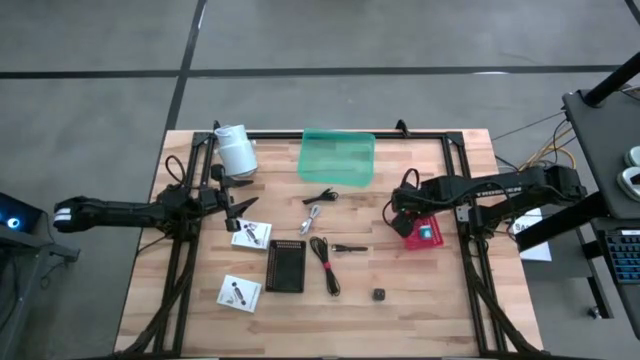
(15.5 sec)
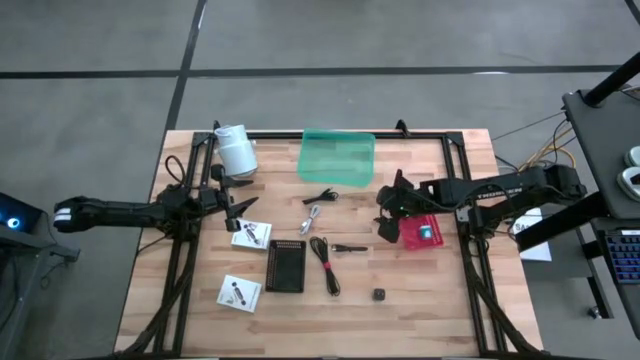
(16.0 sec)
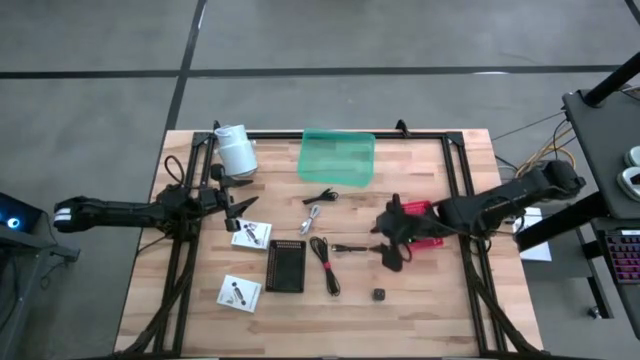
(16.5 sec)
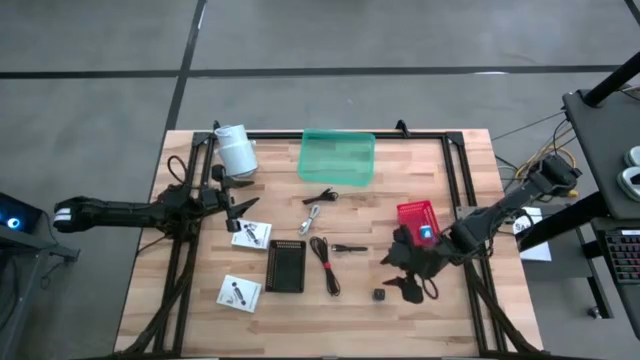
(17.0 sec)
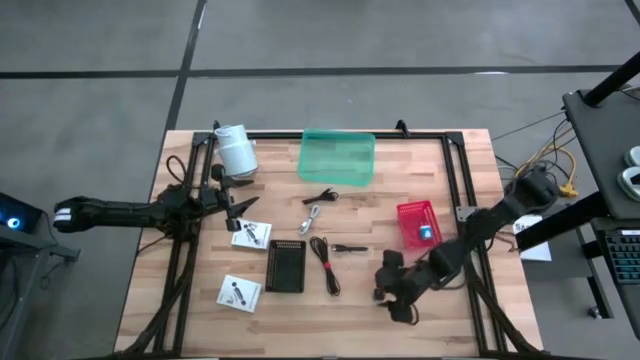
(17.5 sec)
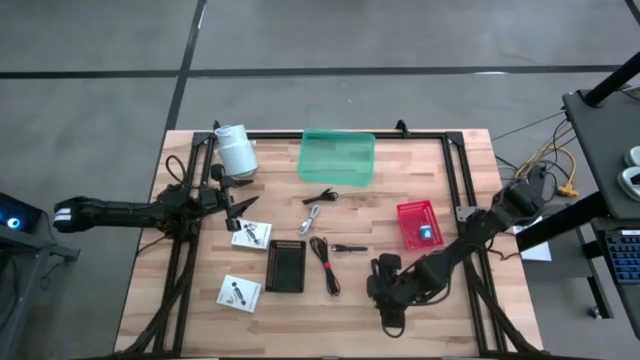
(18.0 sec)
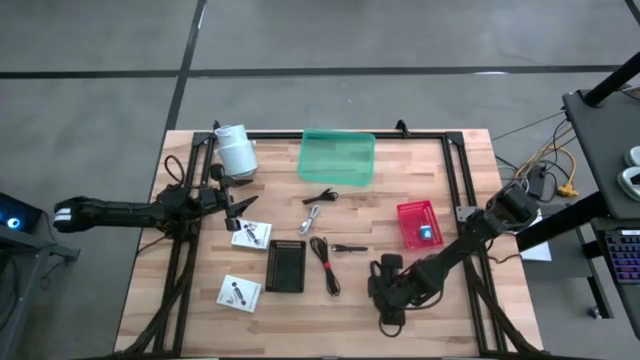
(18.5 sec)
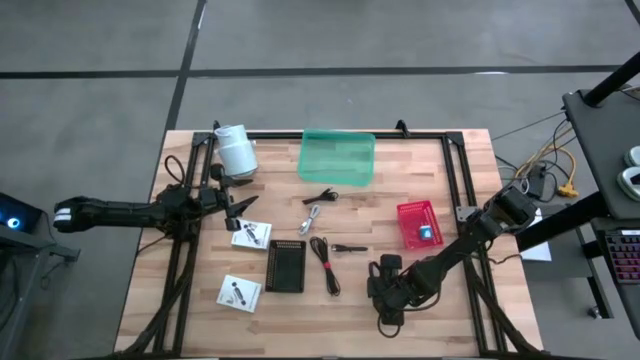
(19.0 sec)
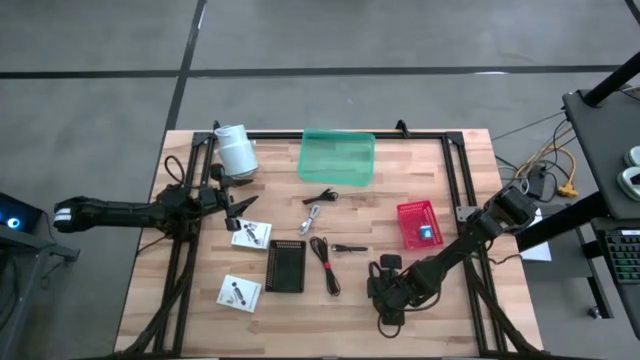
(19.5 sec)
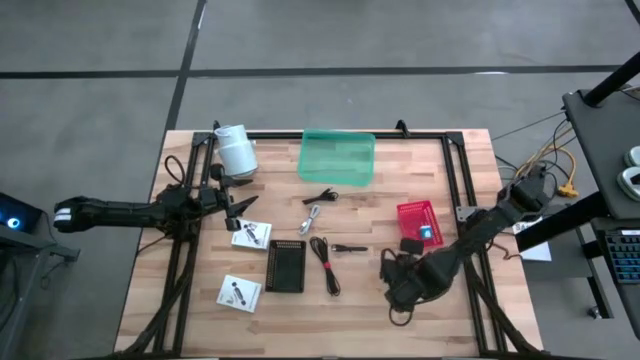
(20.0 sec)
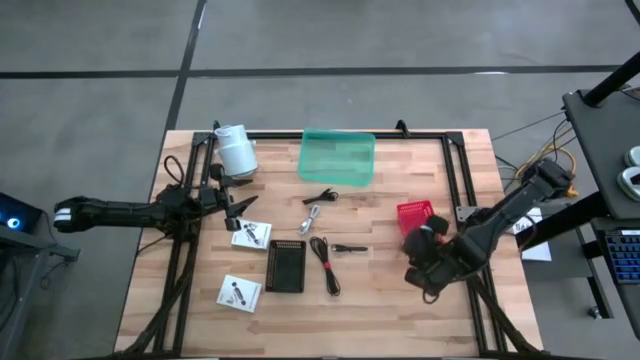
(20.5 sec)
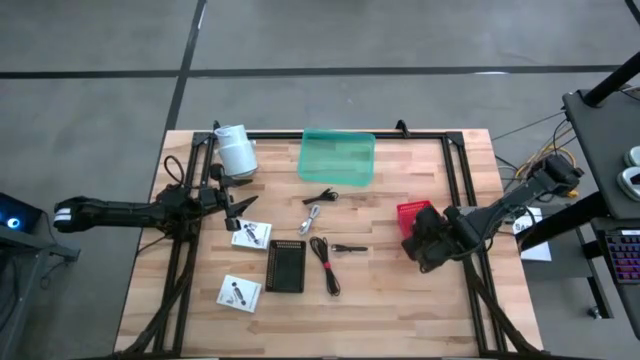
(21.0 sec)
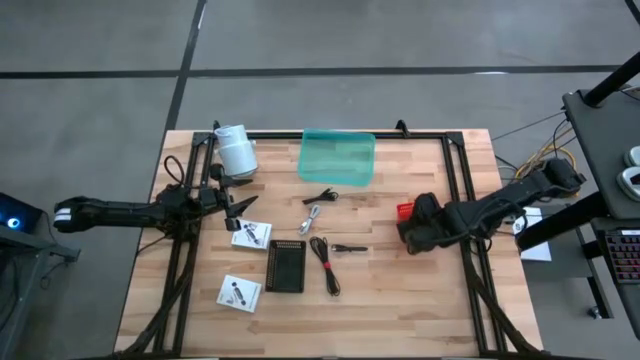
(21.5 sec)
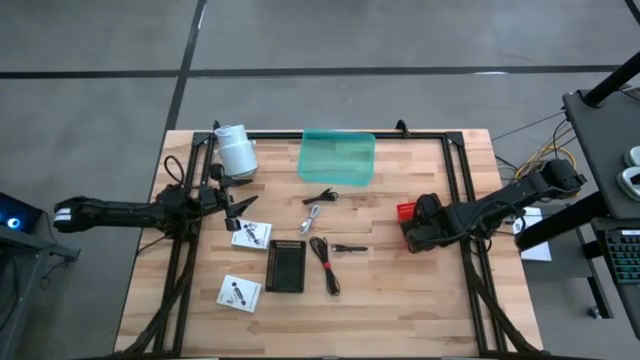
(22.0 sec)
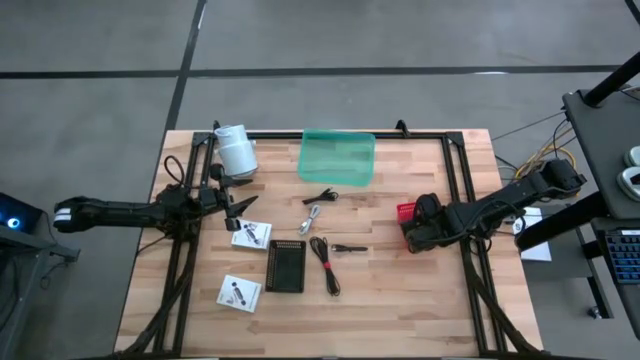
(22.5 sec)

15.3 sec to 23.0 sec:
Task: Pick and place items into bin
Put the black charger adapter into the red bin

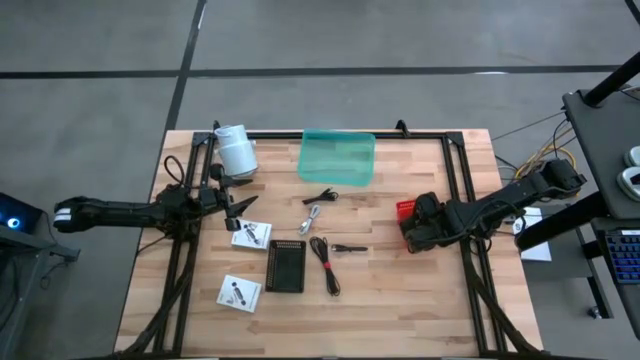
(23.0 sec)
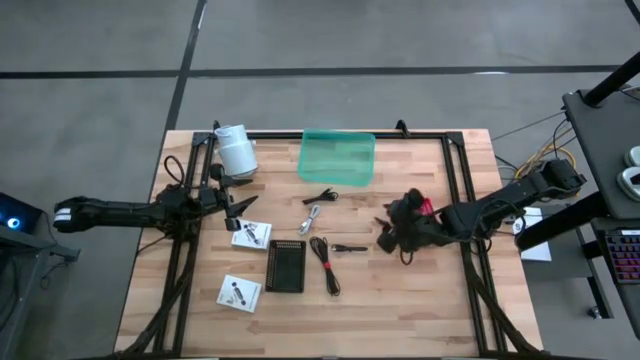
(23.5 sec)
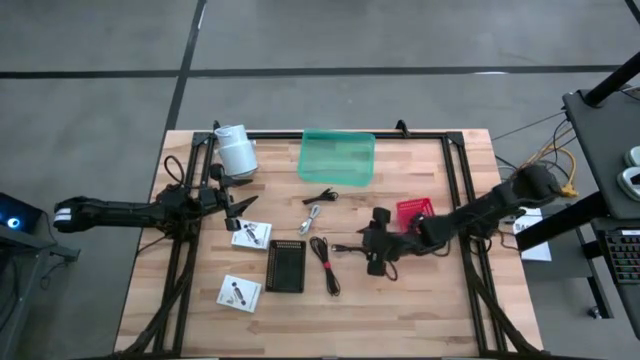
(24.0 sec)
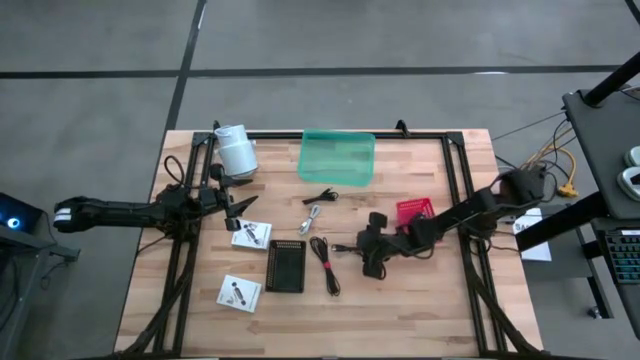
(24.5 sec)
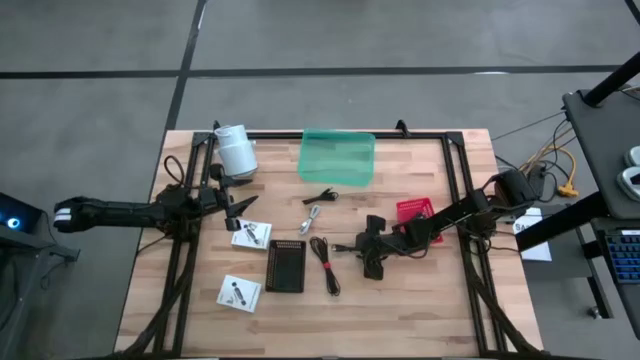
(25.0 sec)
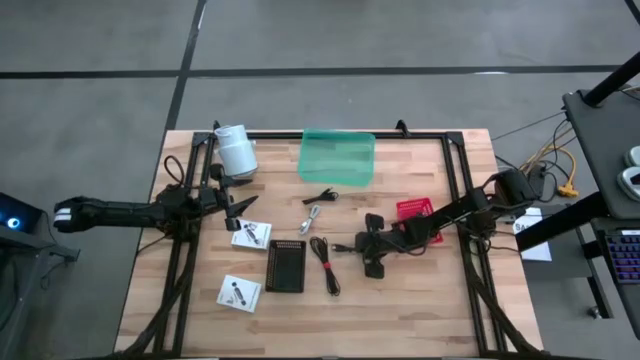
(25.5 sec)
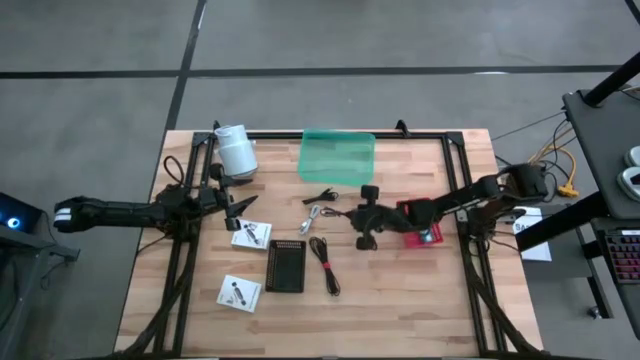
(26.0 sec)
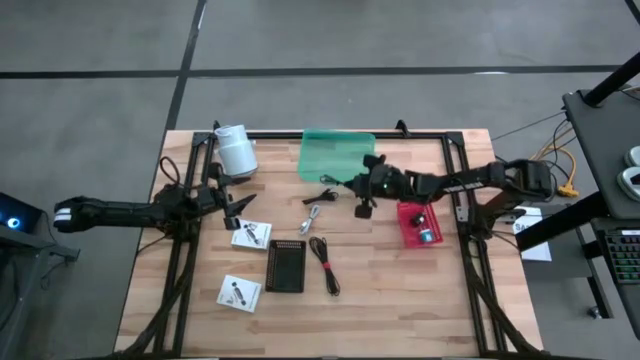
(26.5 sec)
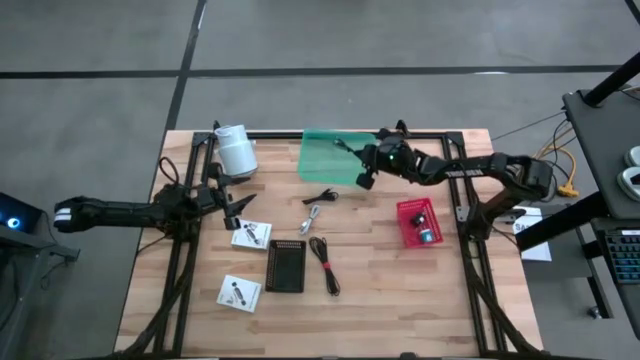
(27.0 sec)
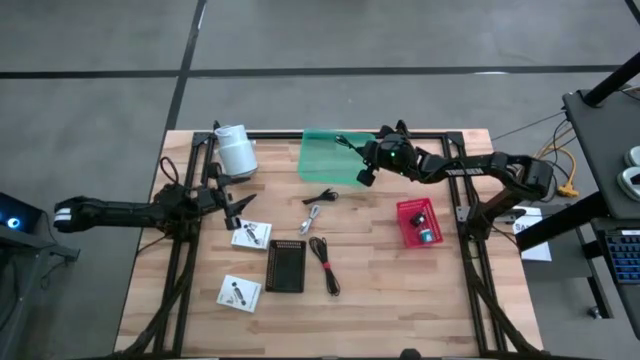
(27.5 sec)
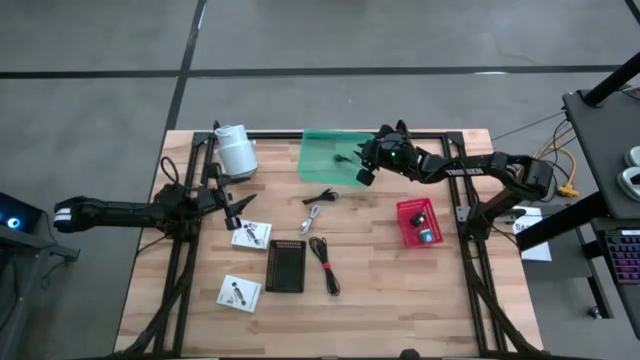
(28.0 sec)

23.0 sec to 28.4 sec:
Put the middle right black charger cable wire into the green bin

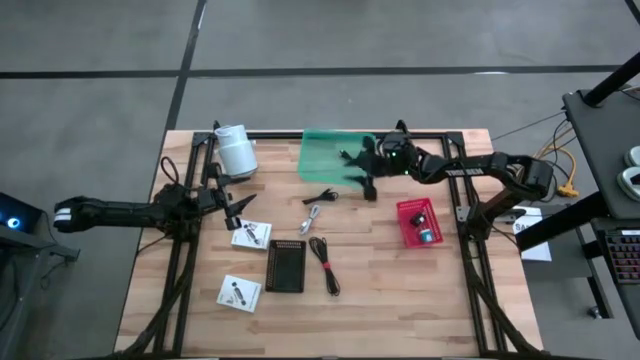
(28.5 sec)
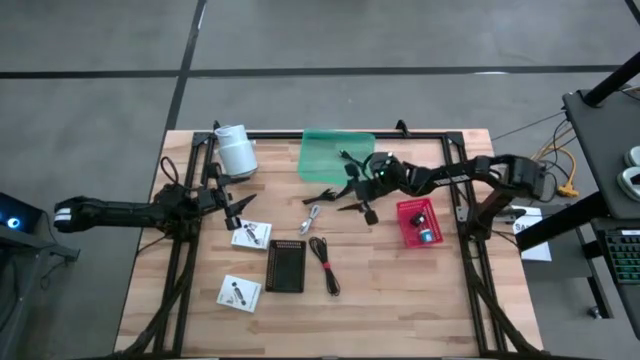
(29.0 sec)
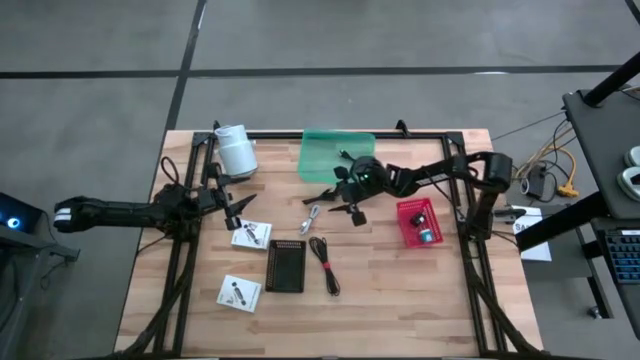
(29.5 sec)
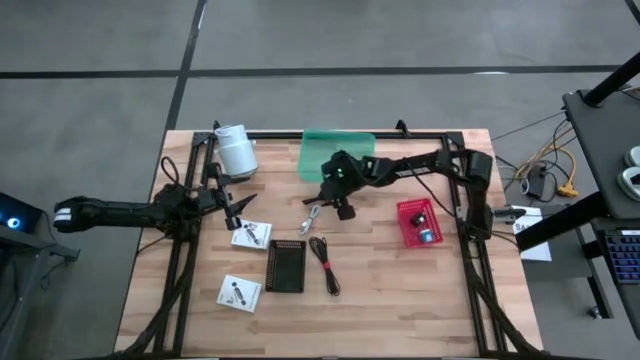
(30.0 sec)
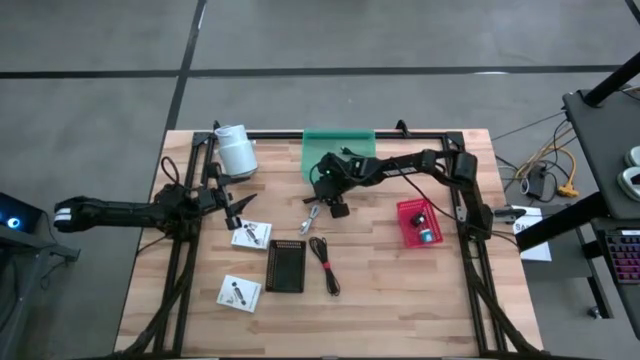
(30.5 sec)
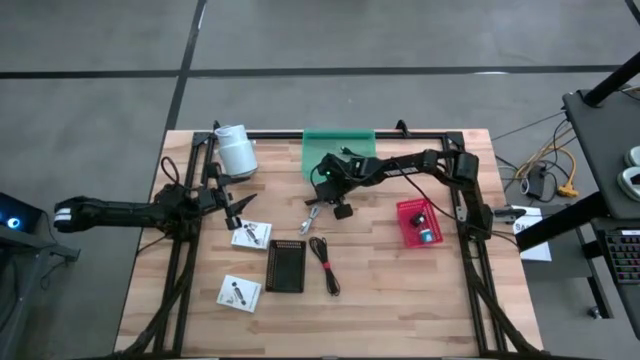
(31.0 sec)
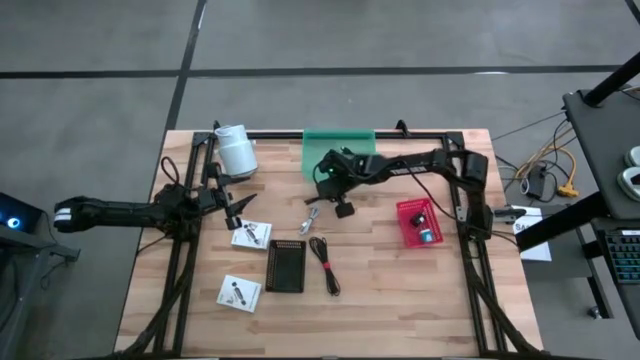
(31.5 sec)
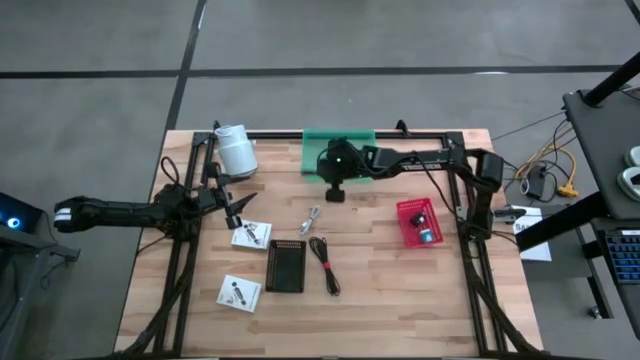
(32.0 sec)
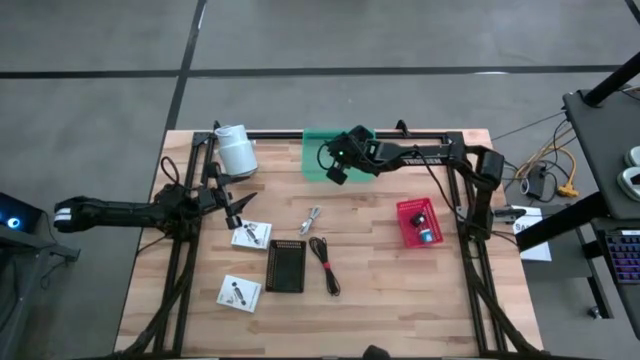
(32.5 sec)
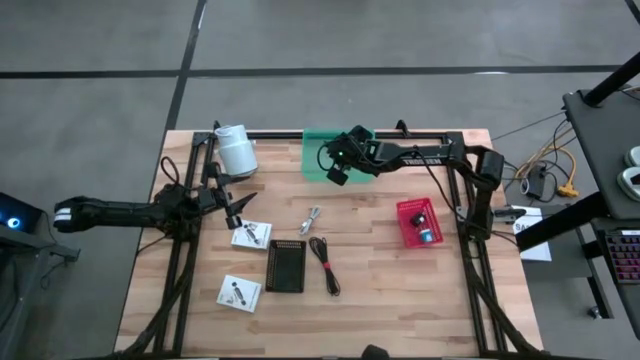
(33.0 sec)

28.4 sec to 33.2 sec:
Put the top black charger cable wire into the green bin

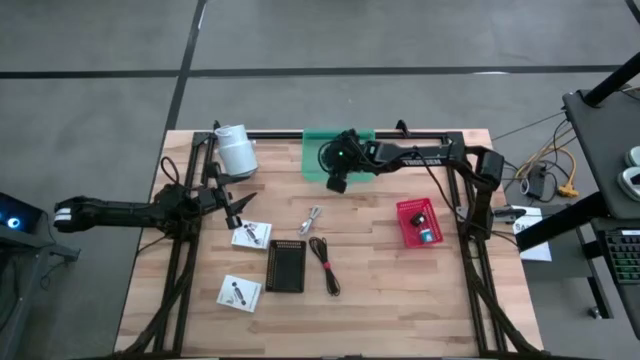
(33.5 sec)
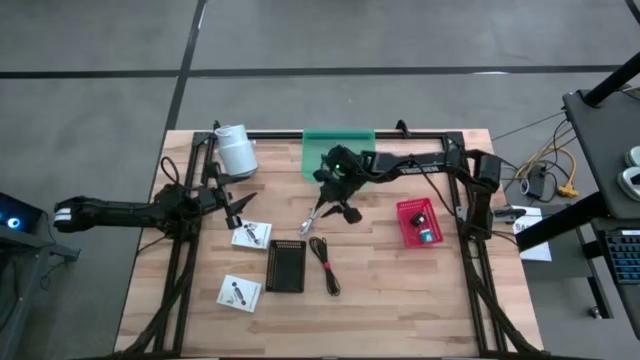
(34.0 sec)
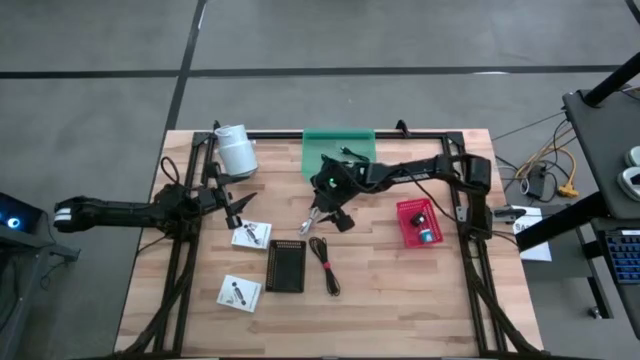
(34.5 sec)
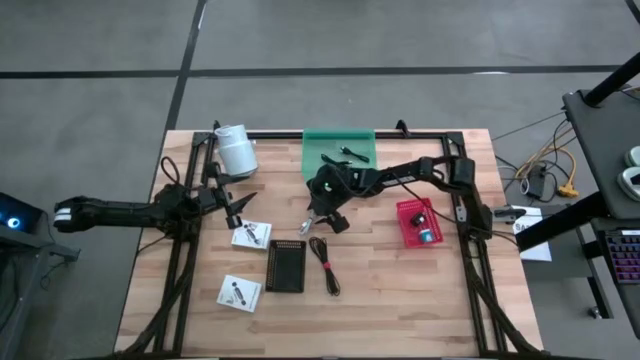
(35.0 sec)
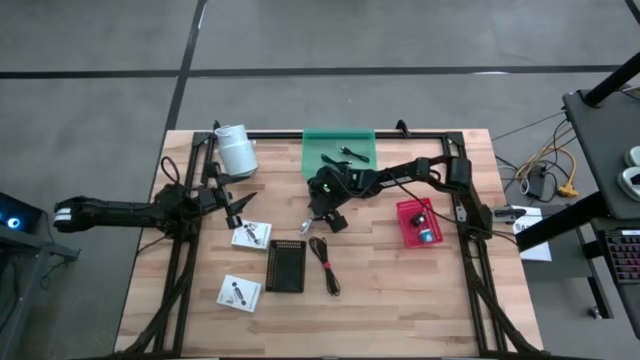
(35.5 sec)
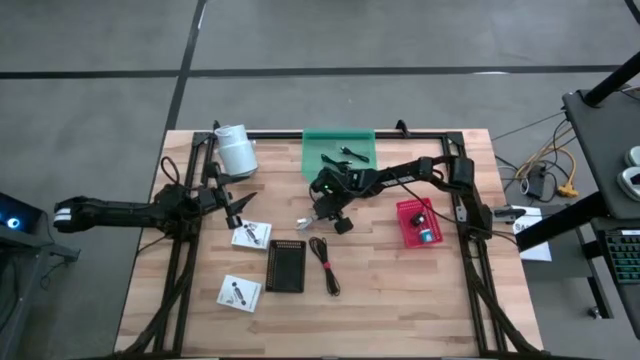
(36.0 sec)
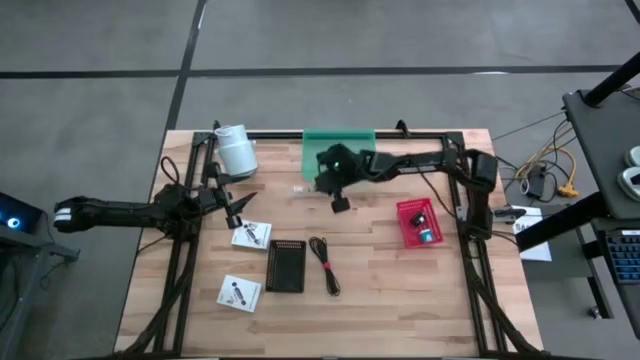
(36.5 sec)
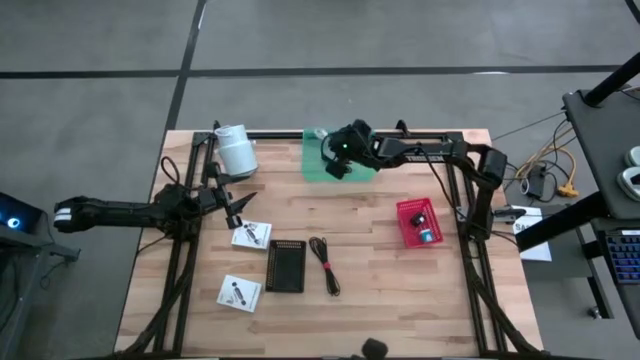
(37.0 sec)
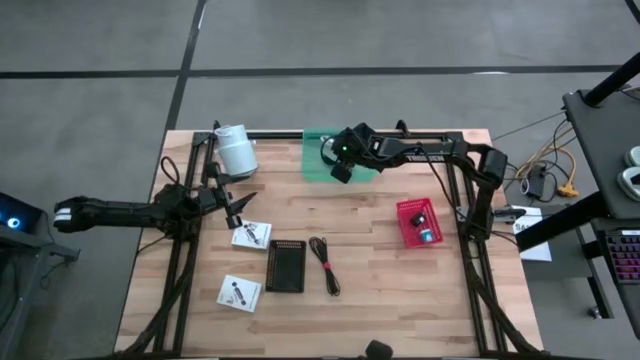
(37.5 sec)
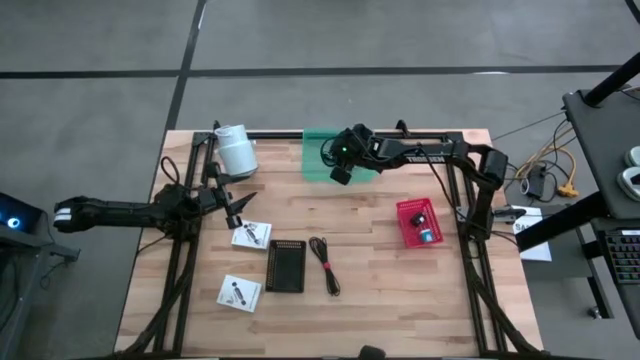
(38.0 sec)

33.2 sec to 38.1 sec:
Put the white charger cable wire into the green bin
